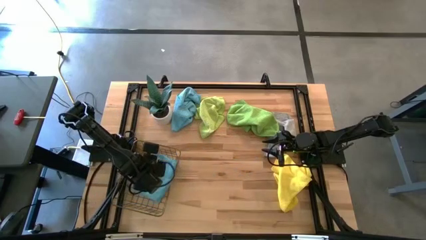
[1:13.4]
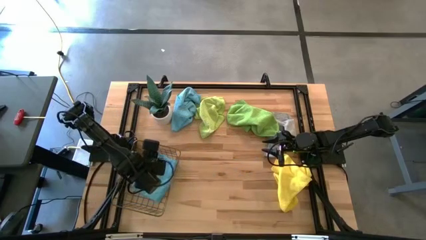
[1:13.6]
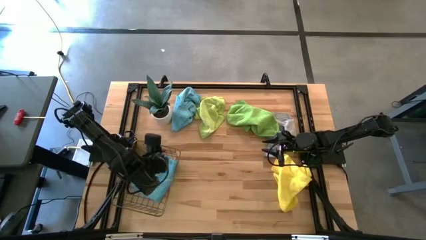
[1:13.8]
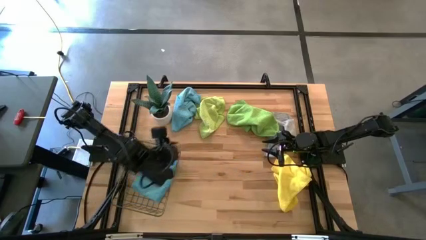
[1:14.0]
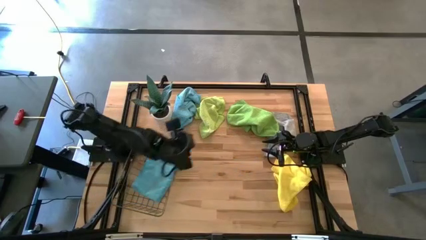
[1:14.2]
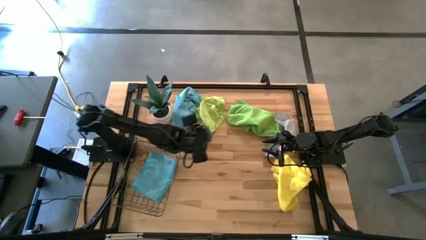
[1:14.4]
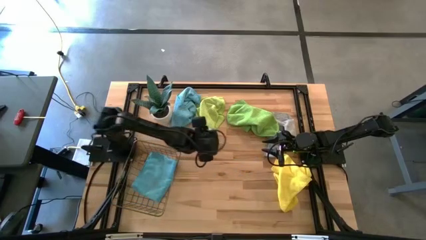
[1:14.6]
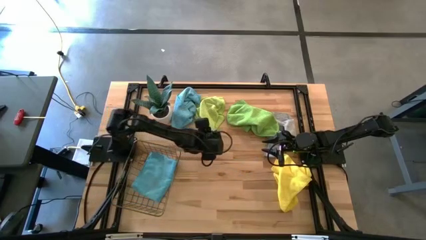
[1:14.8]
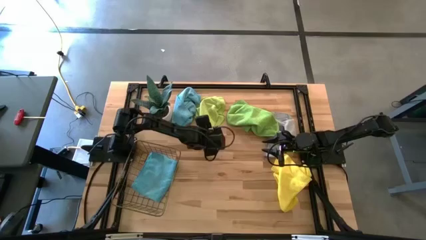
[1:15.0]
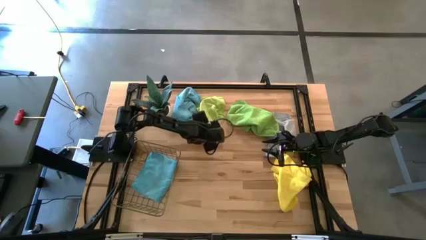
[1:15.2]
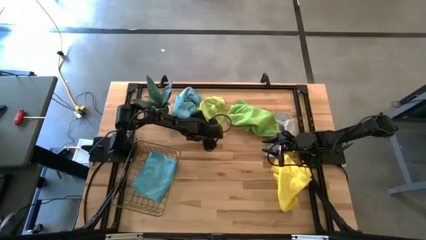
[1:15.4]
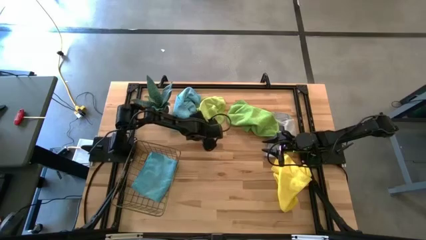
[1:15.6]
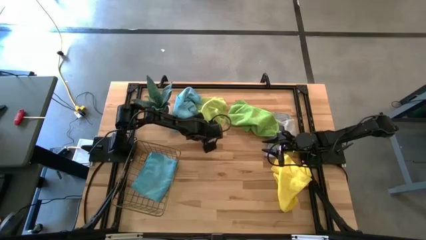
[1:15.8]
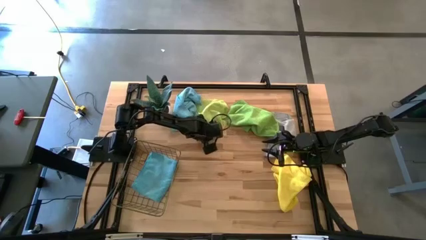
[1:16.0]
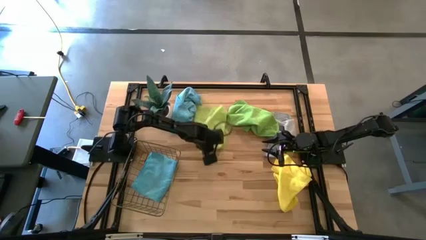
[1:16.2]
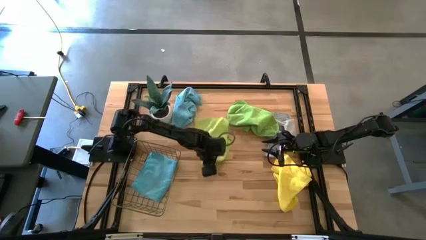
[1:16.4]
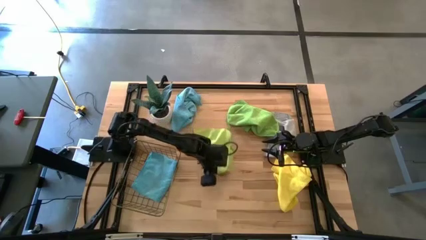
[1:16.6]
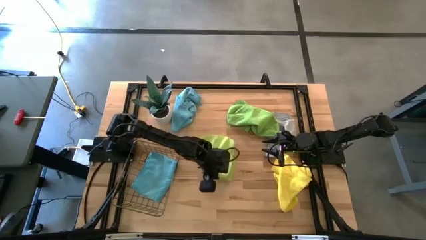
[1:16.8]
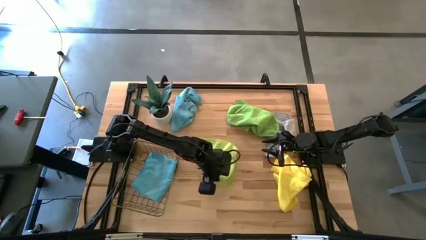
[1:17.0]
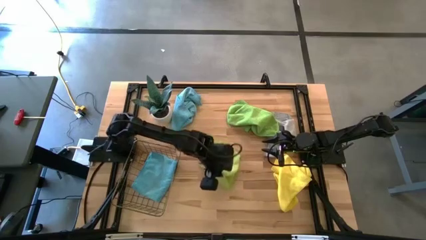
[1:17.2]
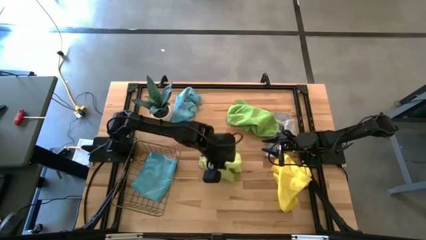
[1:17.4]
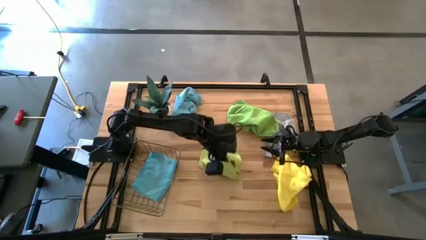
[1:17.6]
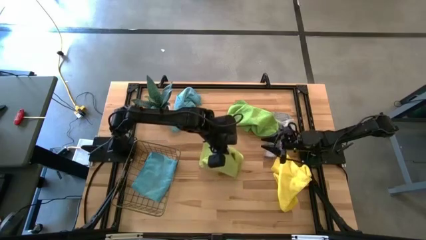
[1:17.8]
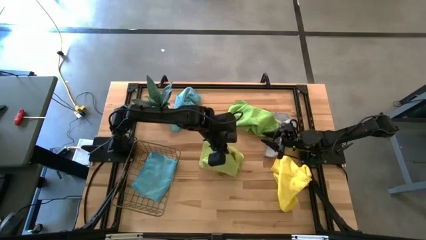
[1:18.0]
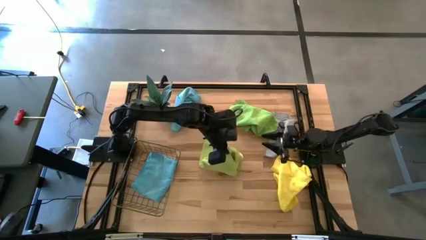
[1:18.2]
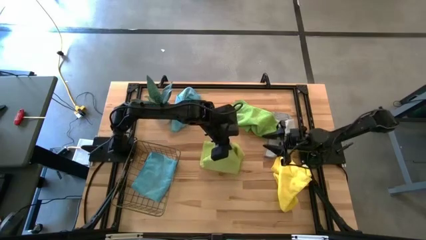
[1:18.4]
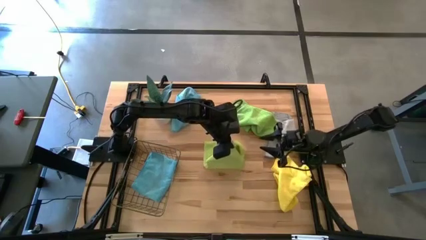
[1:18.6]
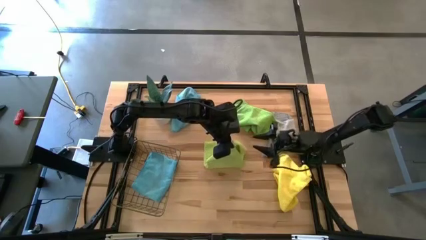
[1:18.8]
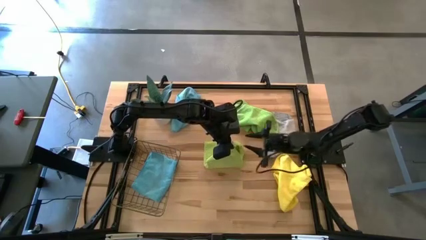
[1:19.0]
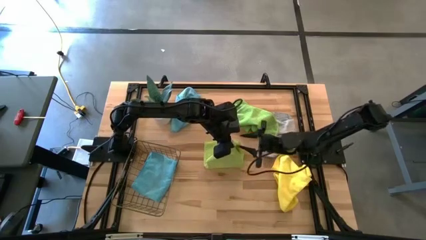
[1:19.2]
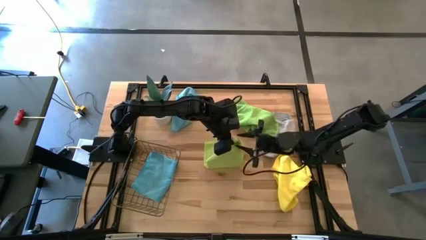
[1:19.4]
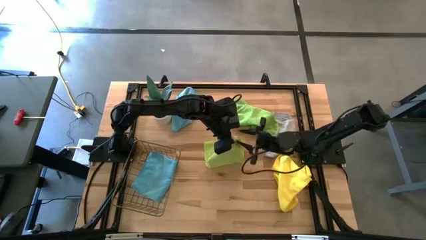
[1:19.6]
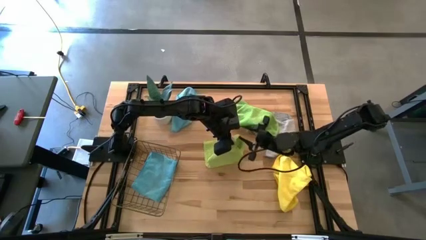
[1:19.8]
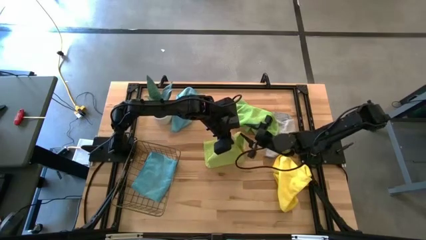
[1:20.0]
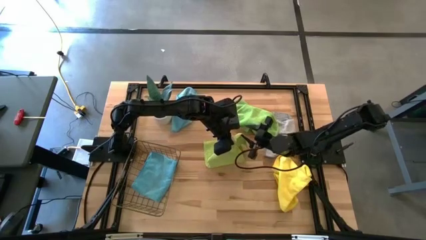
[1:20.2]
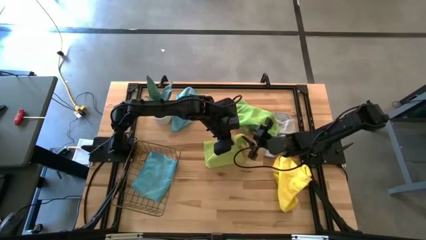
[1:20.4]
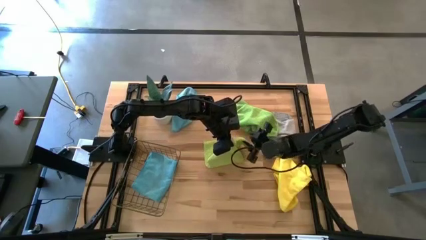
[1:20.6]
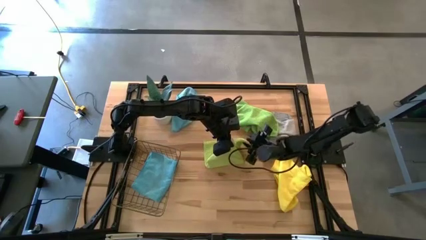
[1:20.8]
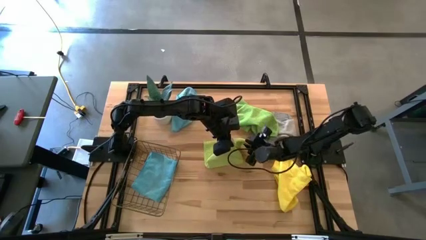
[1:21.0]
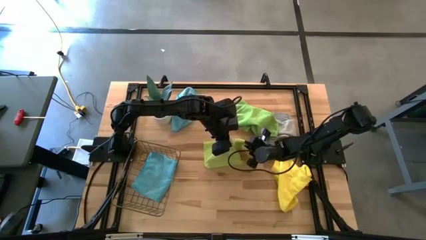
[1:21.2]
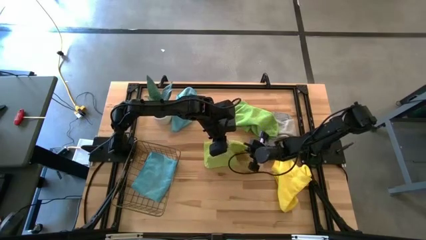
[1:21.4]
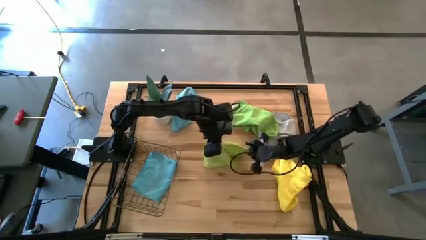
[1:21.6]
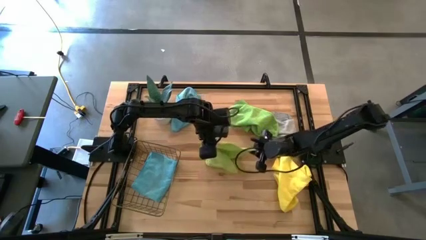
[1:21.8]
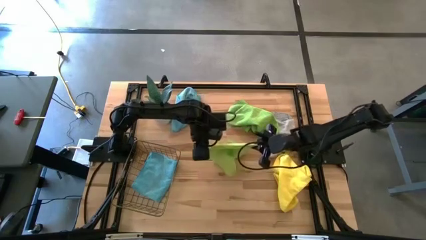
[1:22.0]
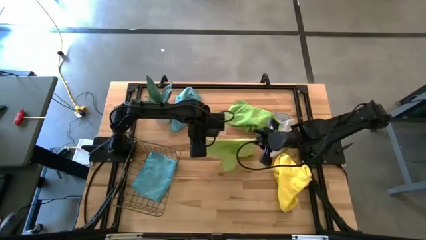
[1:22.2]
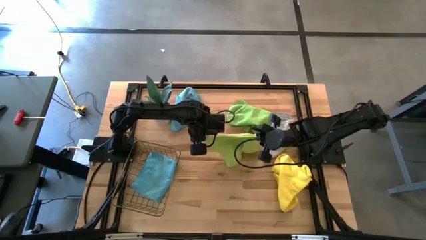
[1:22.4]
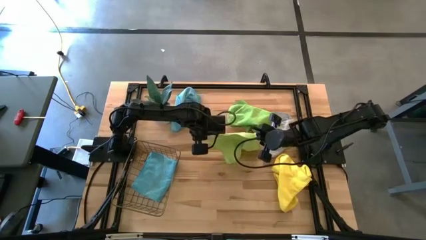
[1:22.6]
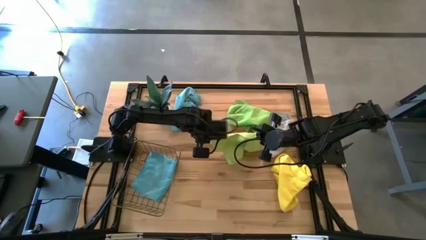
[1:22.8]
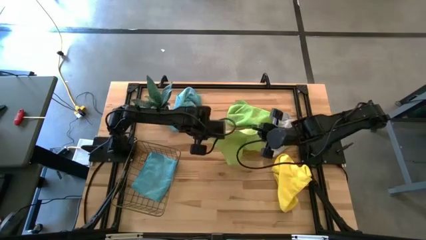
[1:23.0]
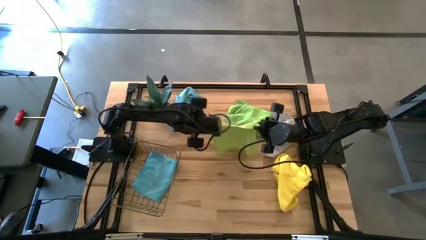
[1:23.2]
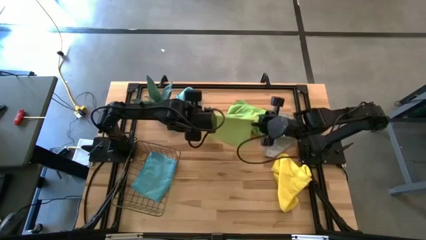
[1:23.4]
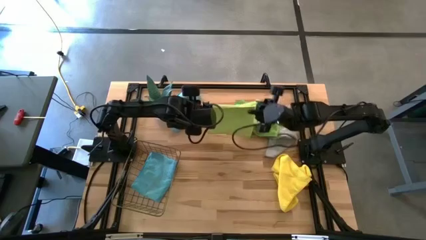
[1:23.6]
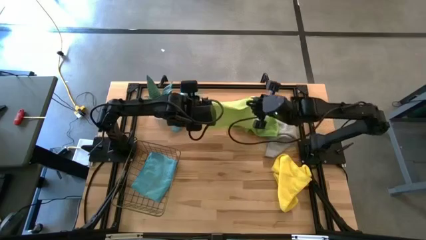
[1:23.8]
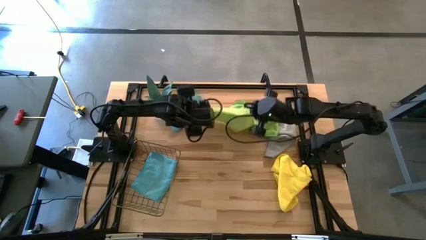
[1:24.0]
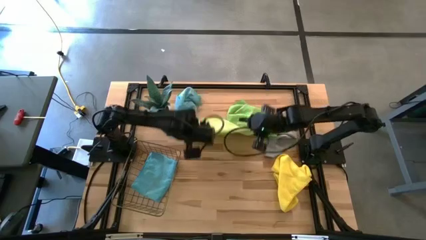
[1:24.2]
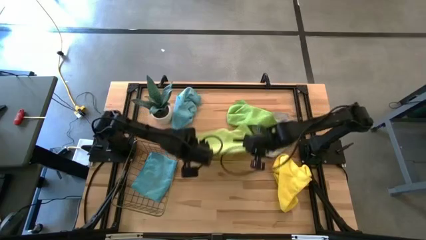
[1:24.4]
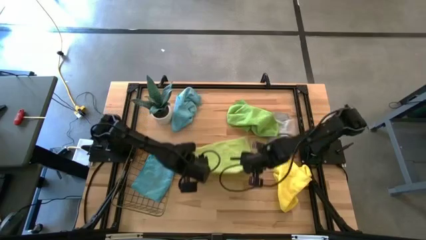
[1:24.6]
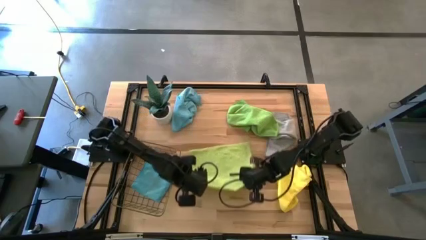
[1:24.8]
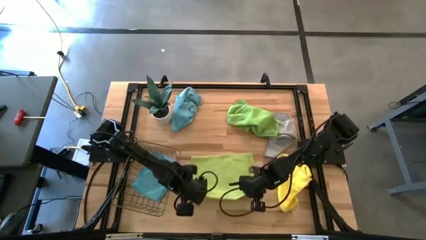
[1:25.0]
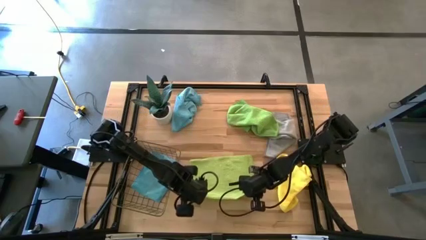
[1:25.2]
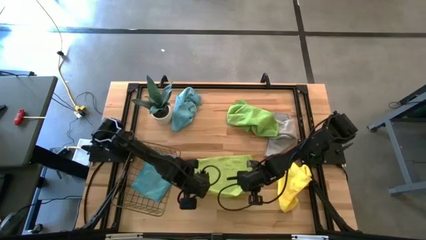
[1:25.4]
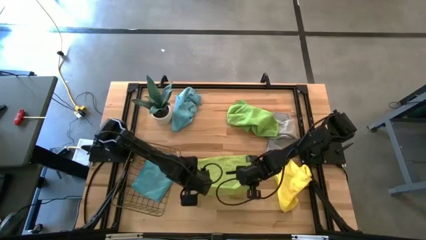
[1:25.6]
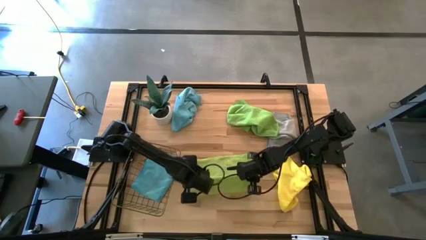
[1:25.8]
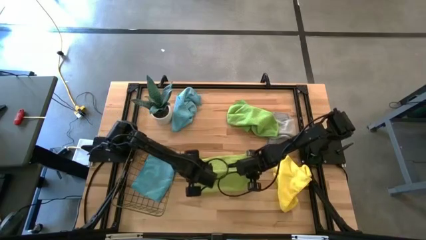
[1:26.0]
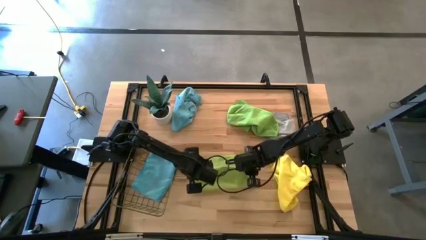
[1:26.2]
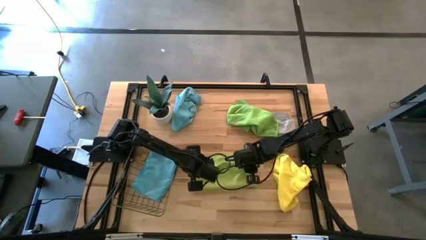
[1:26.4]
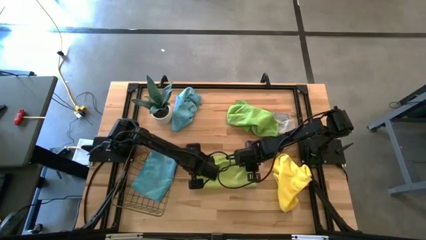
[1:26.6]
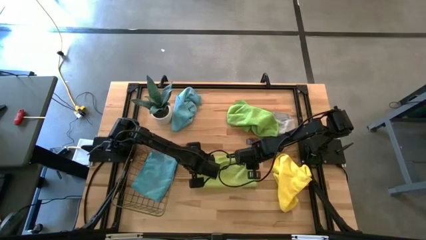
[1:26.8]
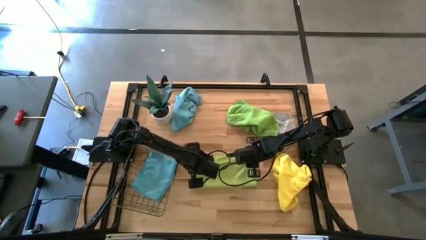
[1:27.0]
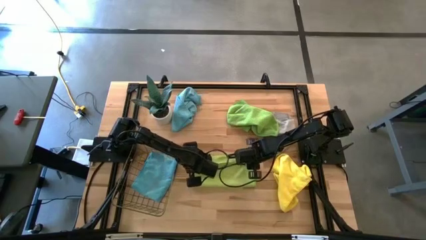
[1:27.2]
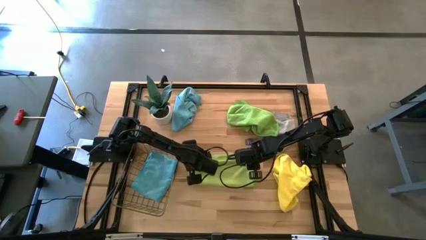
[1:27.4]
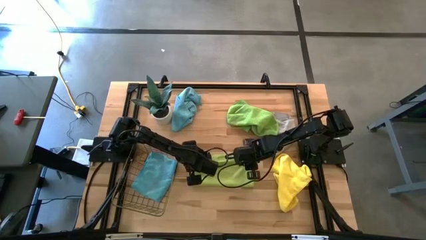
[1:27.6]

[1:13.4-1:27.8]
Task: Fold microfiber towels
Fold the light green microfiber towel
